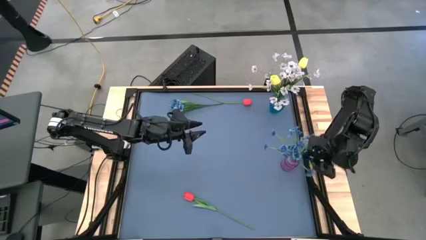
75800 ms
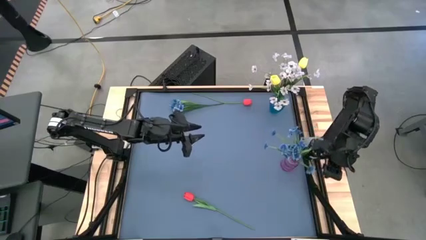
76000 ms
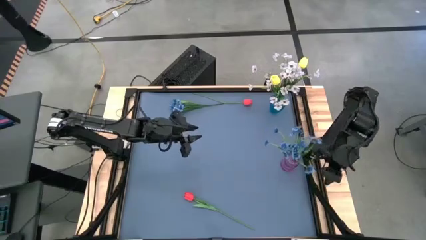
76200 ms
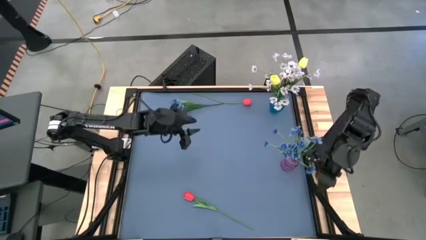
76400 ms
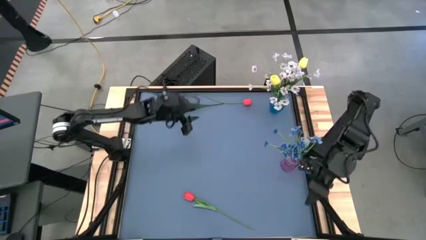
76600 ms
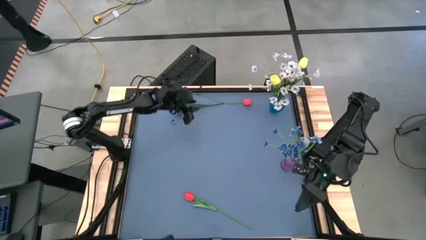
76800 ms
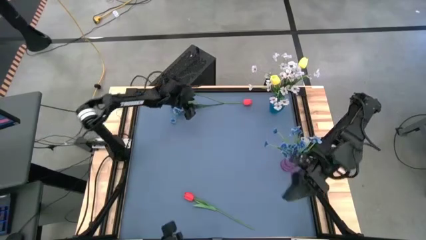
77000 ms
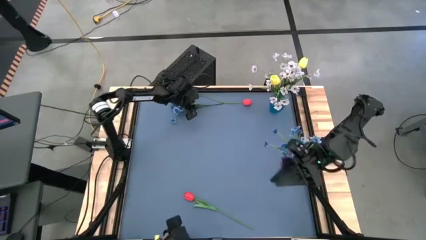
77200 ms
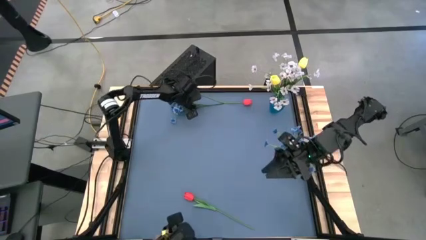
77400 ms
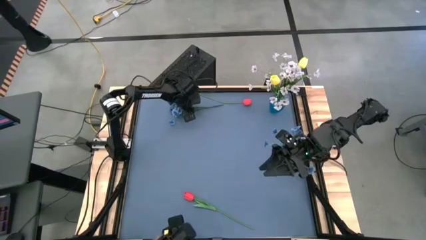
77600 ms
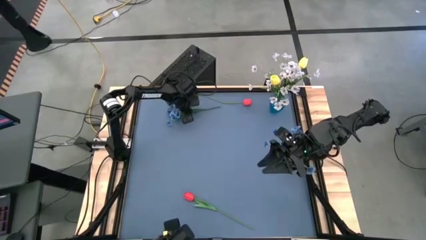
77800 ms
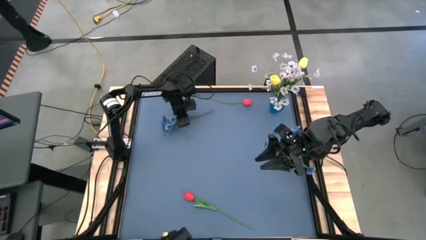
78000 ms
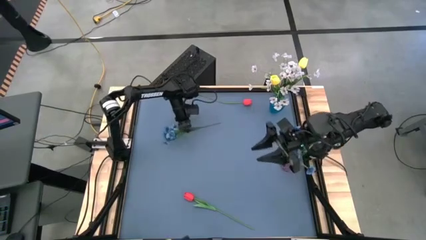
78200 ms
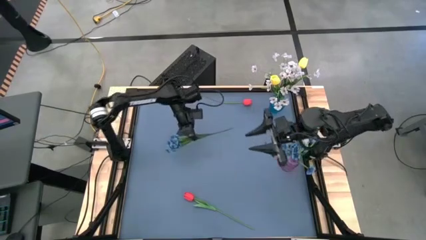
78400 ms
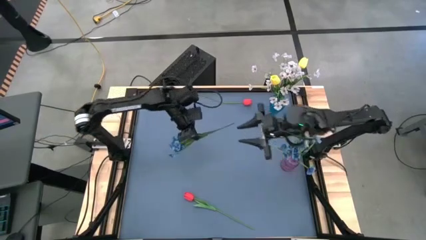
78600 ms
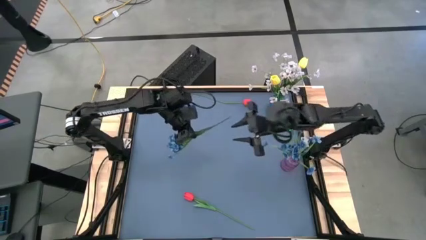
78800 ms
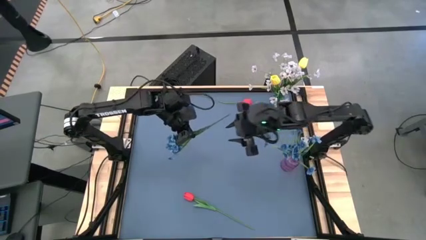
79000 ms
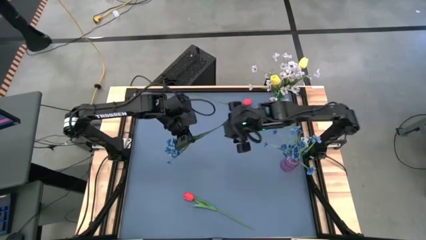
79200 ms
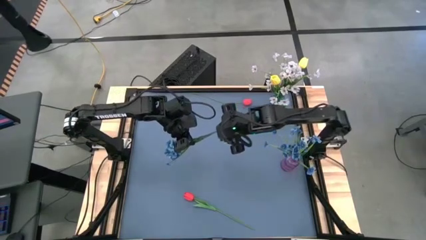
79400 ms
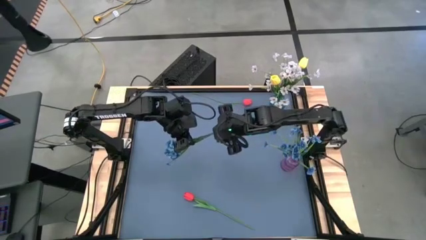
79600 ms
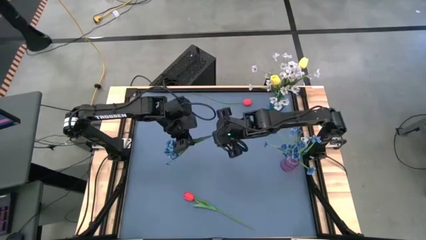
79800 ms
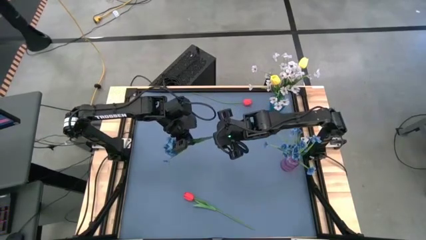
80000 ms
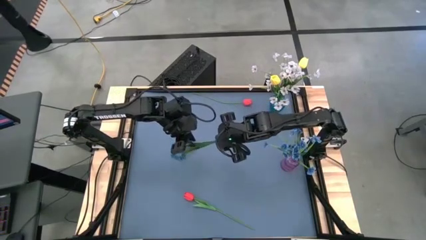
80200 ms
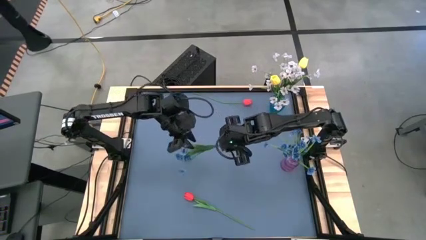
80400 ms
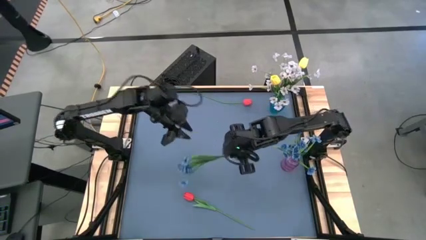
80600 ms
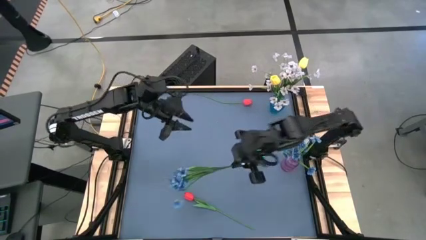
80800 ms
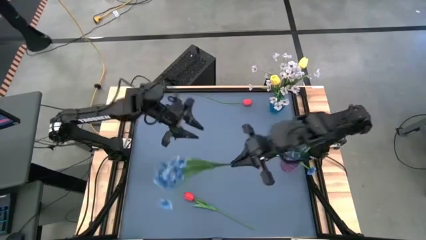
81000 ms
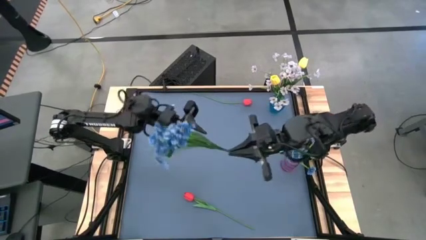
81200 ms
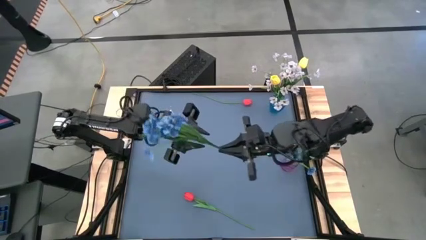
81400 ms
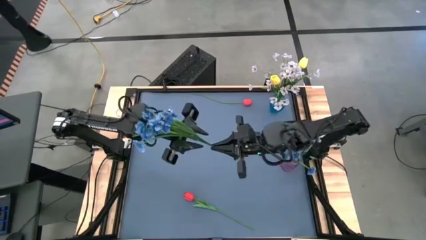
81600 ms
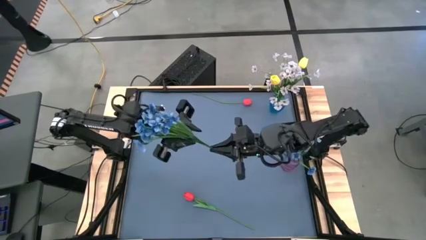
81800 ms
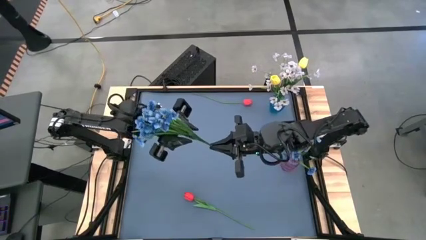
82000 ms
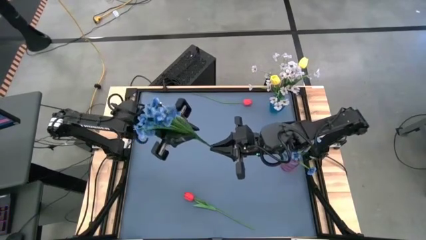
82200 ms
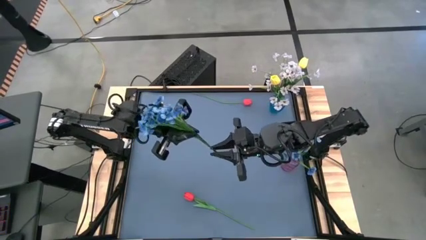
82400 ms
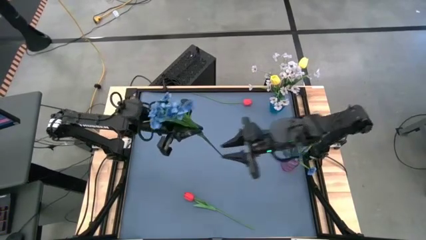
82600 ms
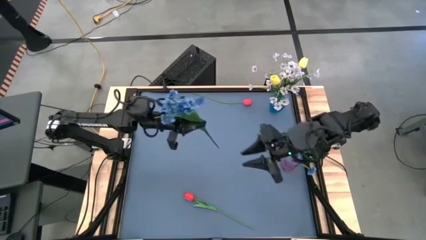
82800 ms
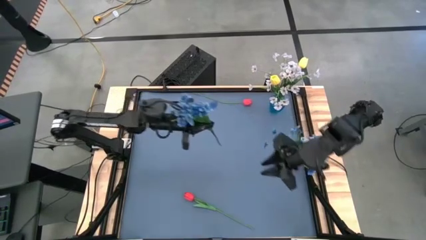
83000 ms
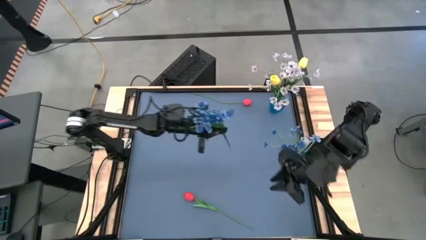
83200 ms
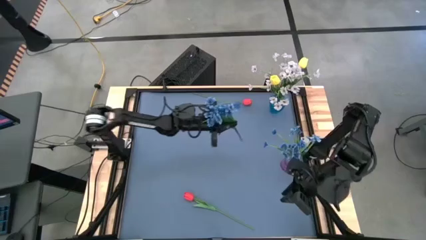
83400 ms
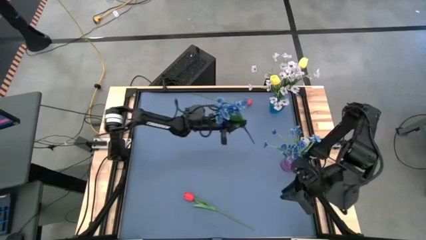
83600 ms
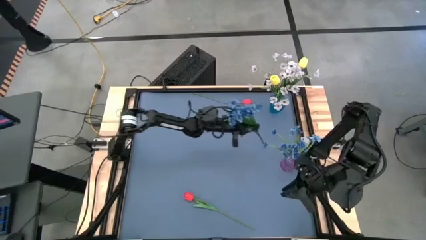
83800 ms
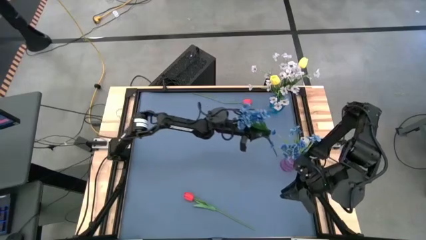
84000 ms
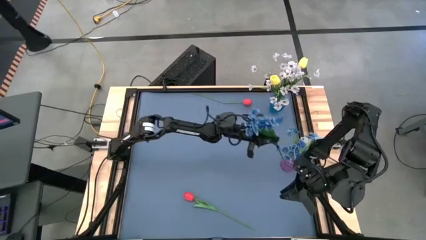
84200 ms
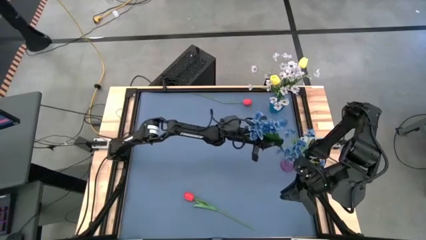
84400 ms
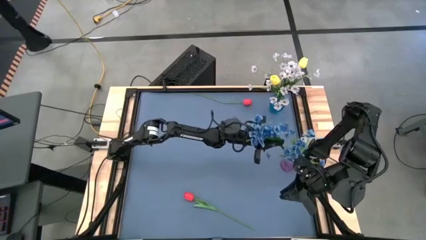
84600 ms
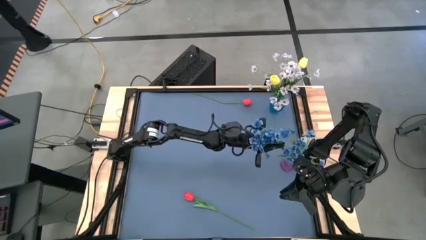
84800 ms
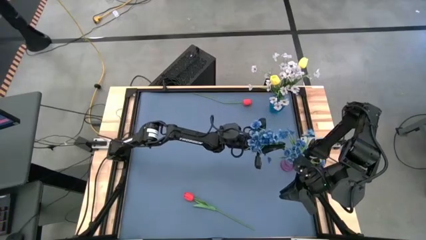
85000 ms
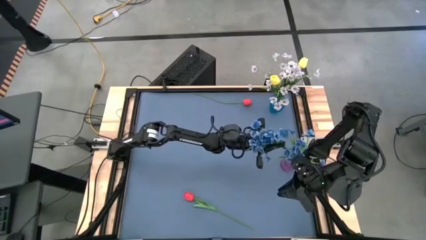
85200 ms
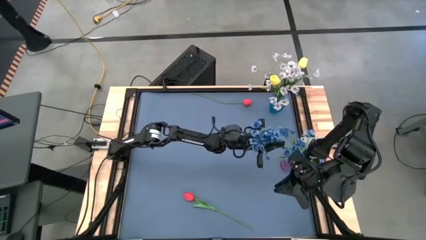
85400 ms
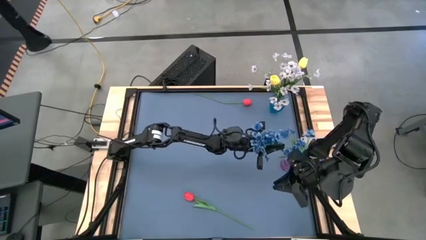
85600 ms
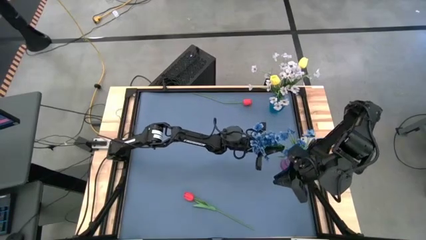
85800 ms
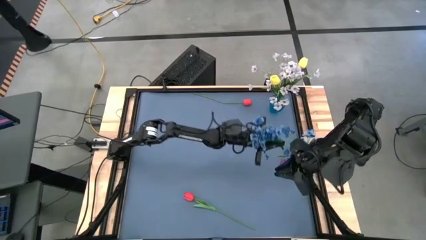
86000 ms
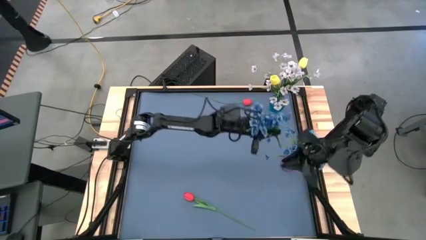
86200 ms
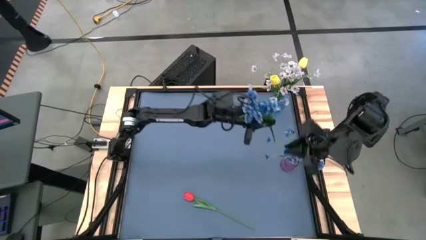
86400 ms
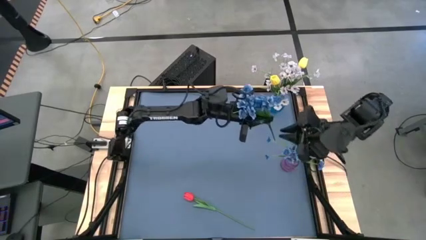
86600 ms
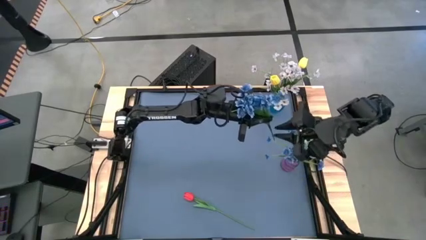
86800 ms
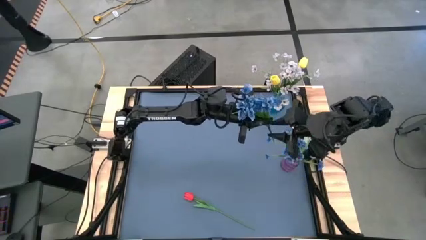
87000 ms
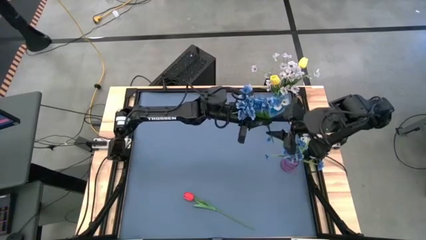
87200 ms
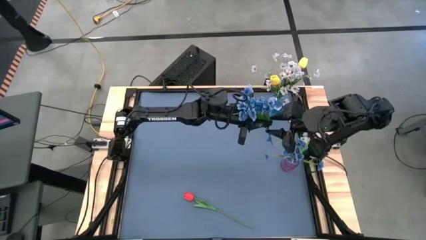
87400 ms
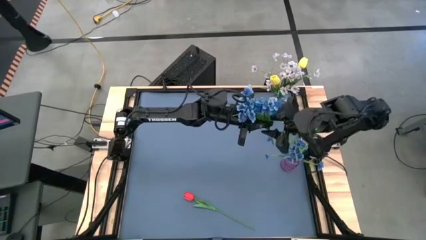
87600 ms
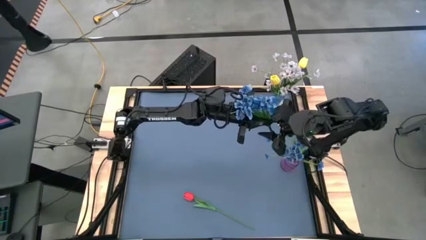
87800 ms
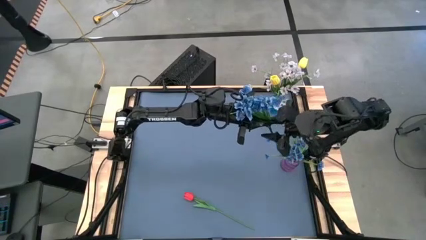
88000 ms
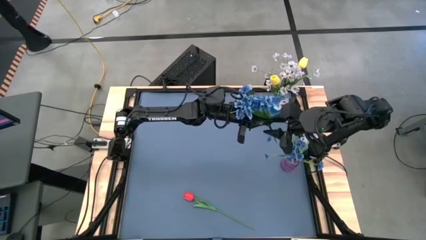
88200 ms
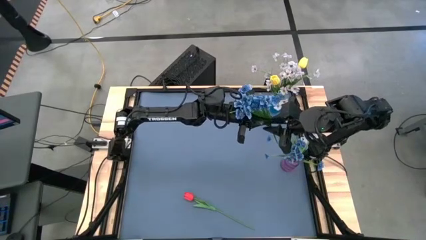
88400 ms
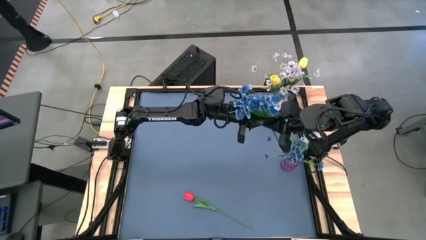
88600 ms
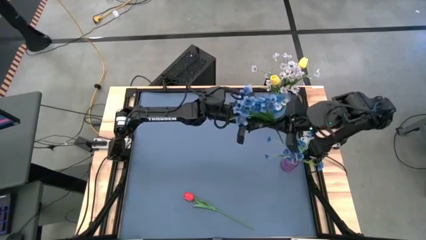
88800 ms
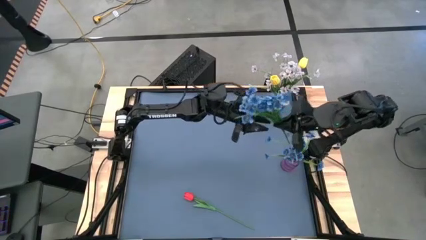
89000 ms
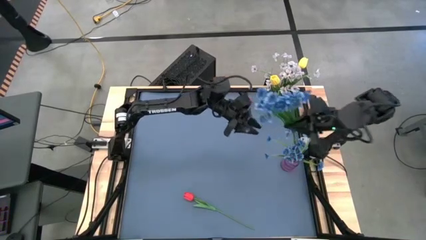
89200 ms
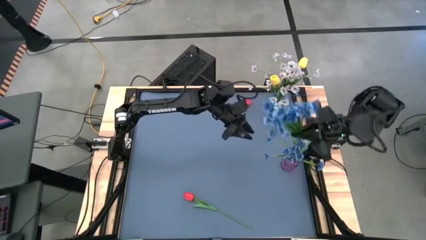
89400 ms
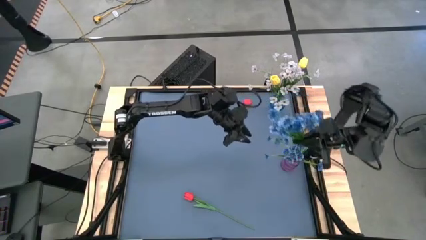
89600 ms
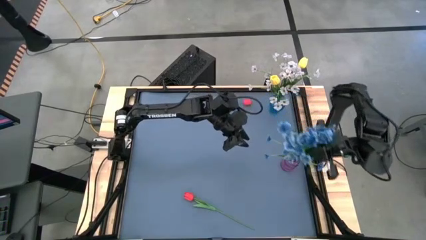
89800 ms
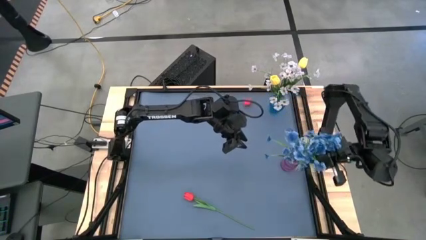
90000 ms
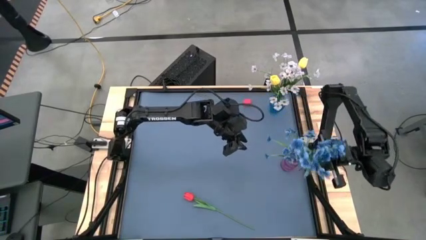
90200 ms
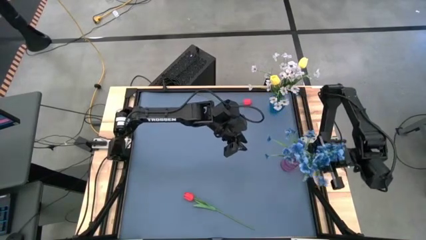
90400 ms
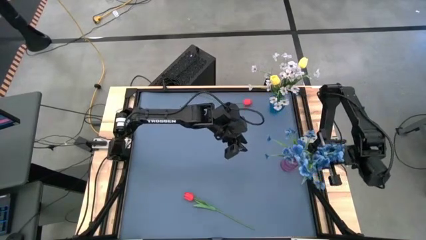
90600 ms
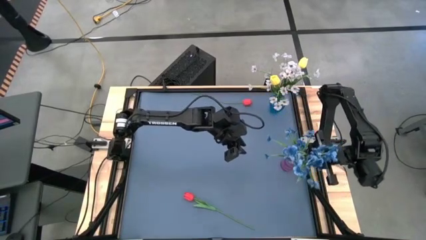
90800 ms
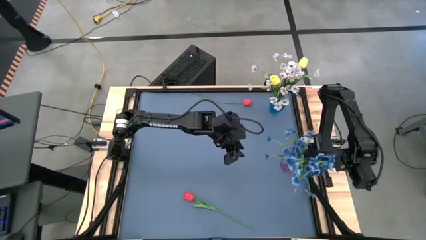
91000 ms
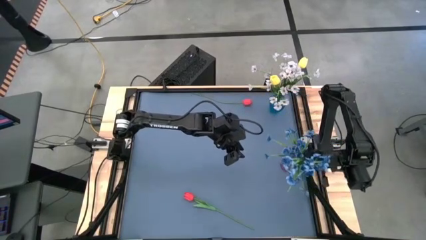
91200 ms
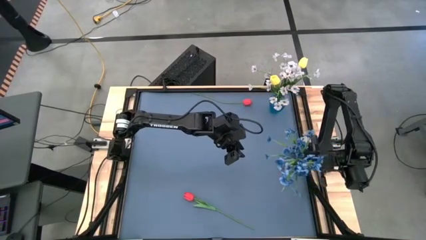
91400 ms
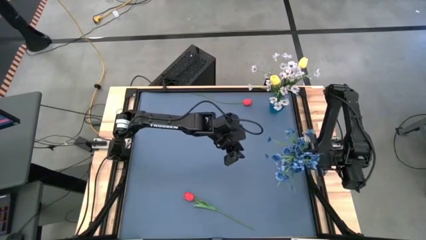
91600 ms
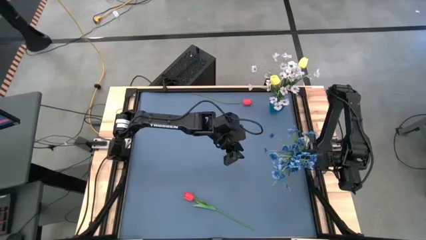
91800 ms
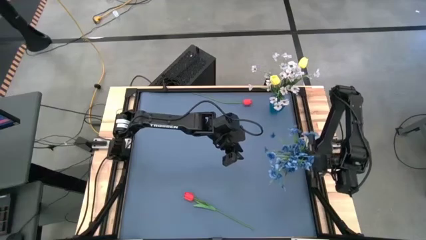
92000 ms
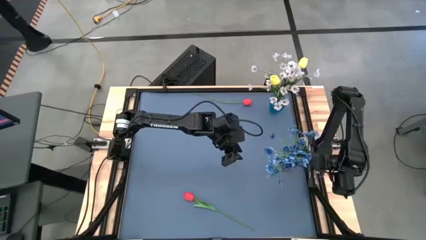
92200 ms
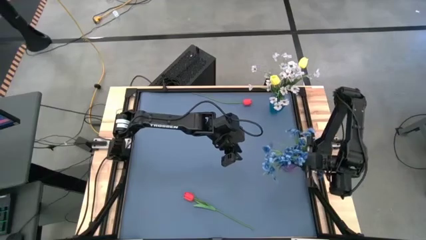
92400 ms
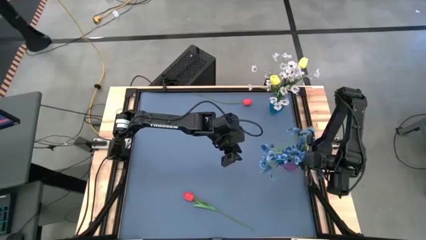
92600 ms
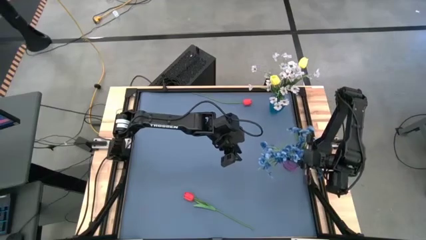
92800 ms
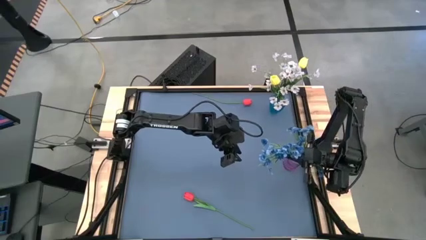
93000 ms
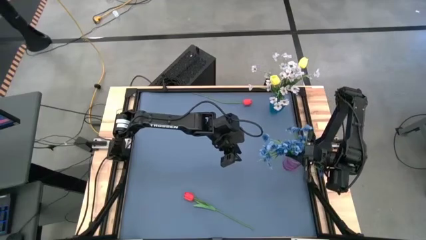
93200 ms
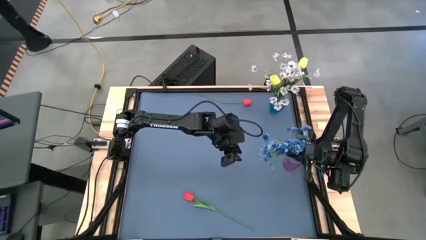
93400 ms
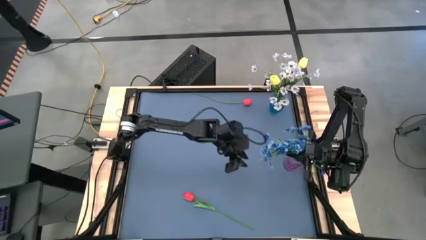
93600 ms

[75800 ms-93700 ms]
Task: Sort flowers into vase by color
Put the blue flowers into the violet vase
